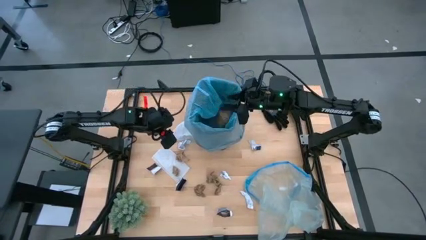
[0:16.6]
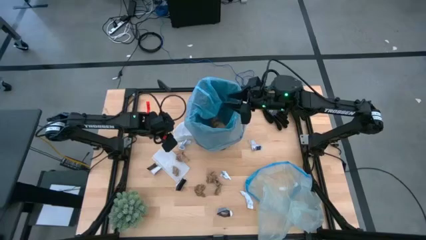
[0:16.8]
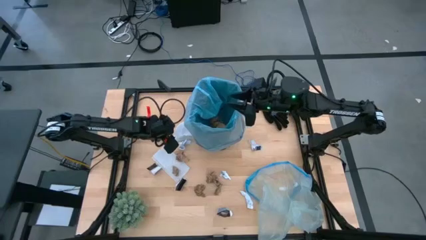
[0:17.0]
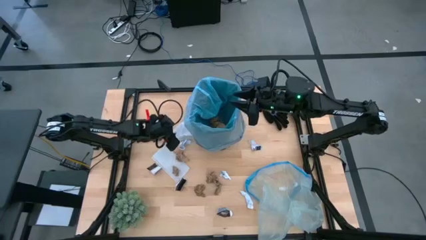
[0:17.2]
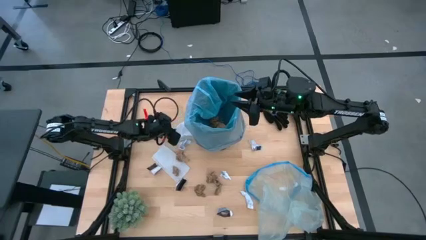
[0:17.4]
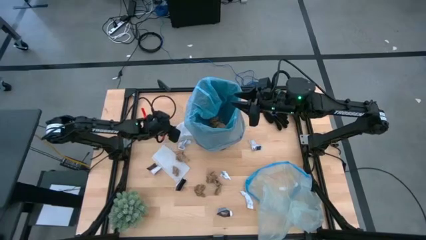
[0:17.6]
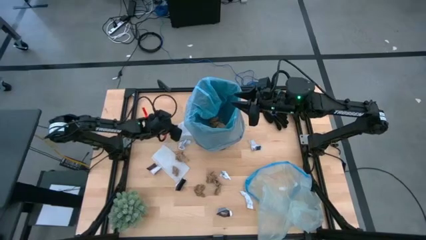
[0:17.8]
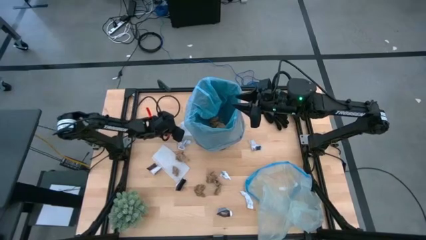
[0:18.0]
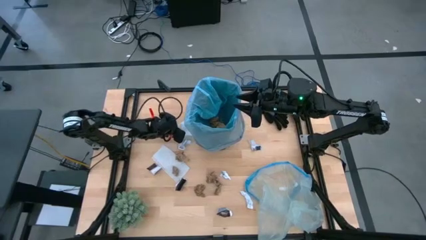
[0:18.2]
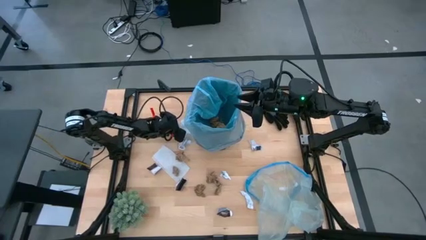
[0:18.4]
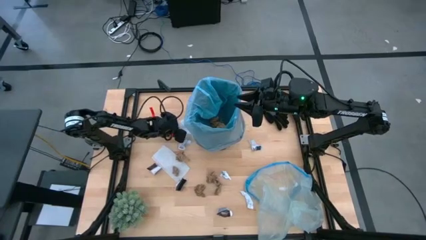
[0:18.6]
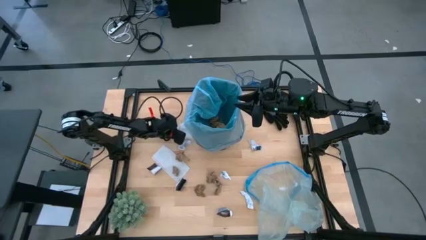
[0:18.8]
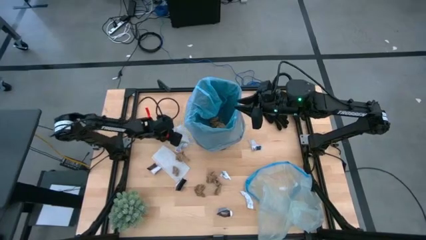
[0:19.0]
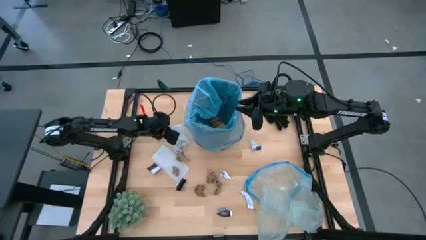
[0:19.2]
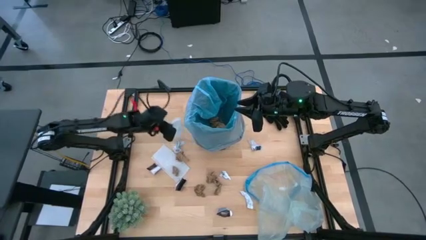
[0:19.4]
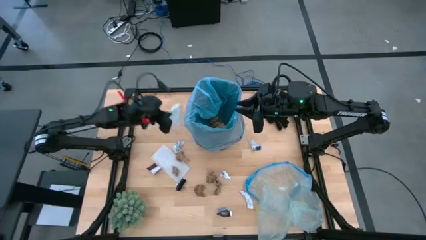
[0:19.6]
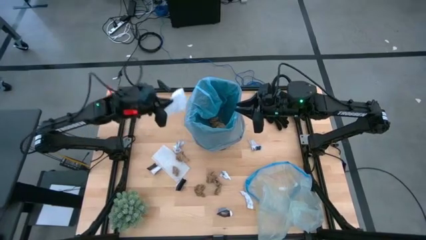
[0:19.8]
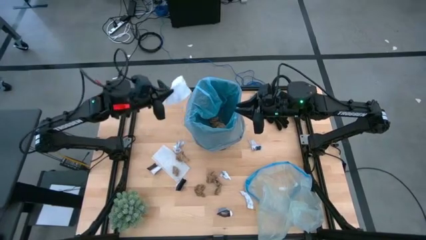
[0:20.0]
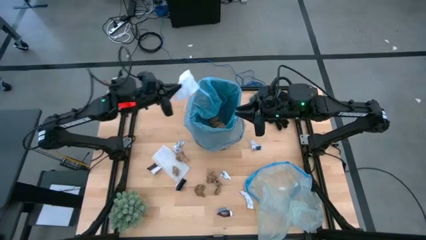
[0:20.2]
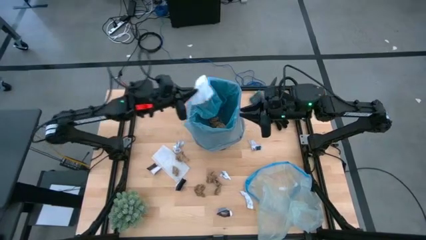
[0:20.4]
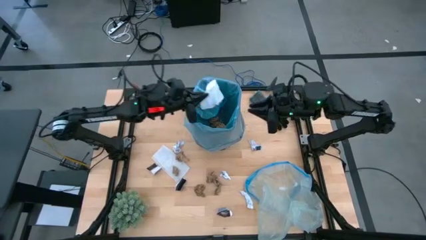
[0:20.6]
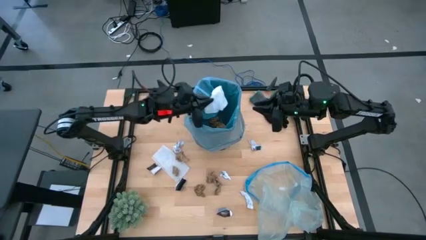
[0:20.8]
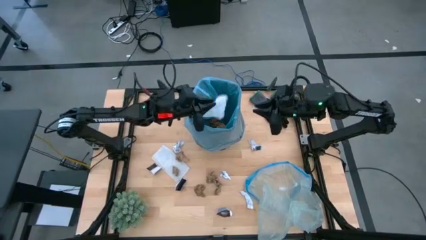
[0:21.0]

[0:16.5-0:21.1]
Task: place trash/remove bag and relplace
Put the white wipes into the trash bin

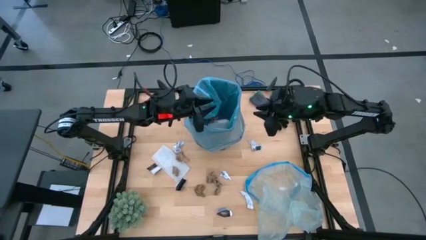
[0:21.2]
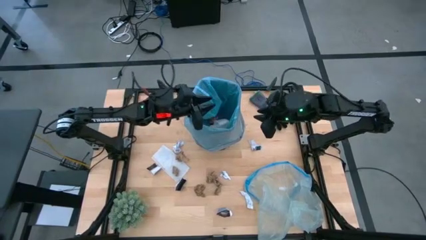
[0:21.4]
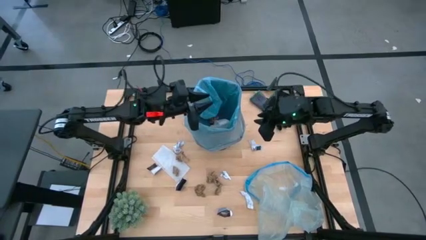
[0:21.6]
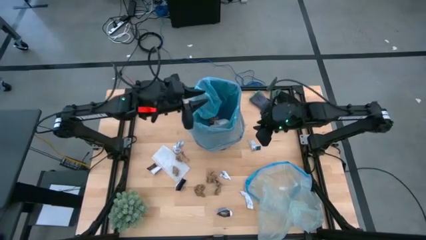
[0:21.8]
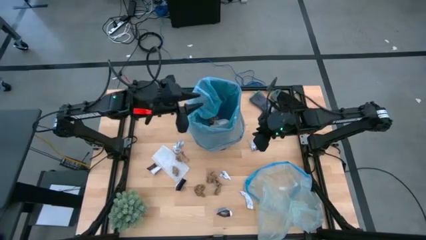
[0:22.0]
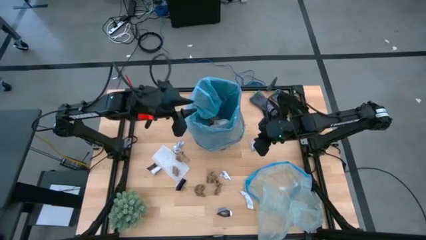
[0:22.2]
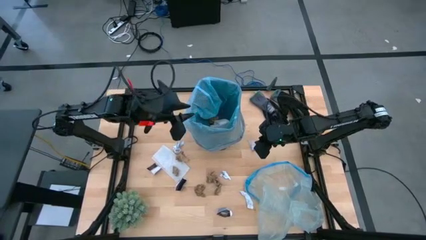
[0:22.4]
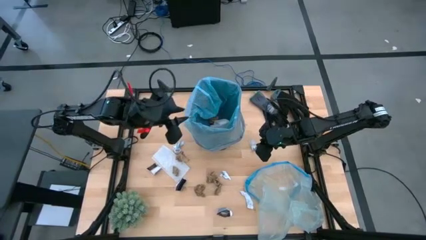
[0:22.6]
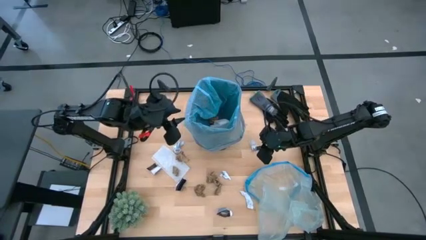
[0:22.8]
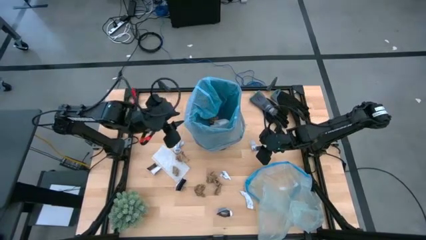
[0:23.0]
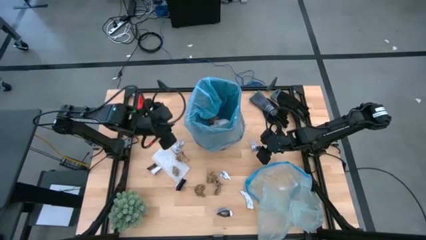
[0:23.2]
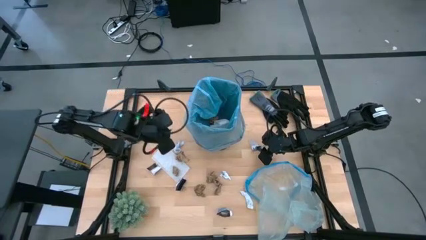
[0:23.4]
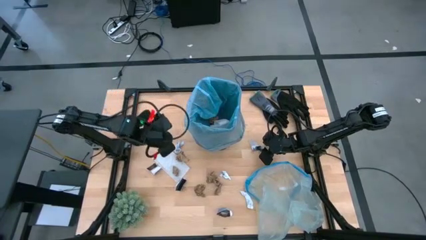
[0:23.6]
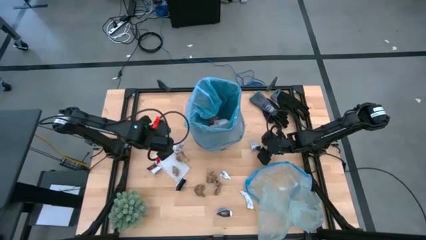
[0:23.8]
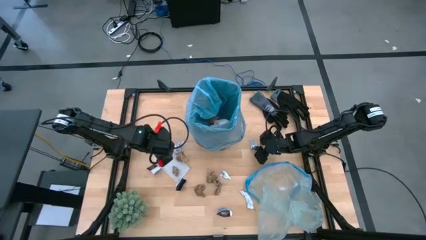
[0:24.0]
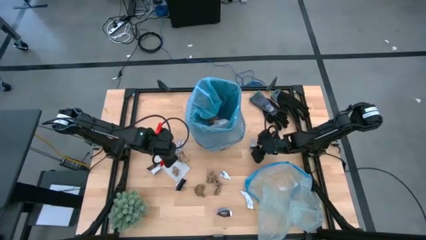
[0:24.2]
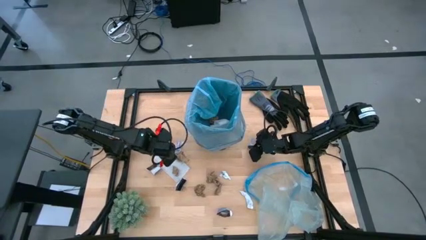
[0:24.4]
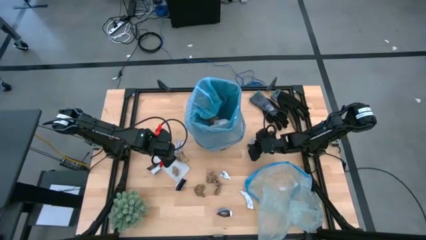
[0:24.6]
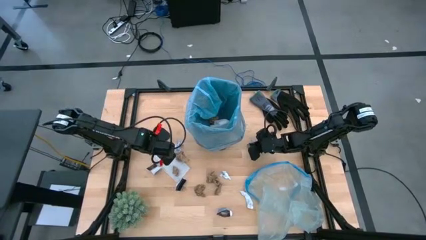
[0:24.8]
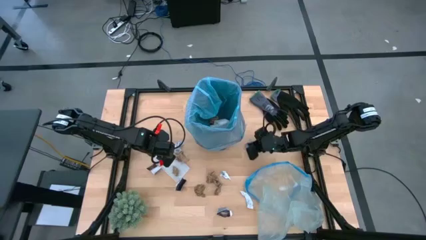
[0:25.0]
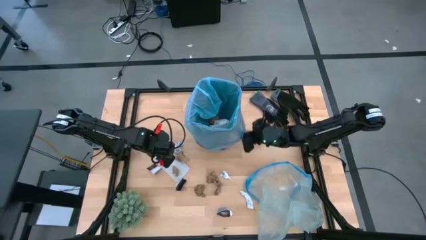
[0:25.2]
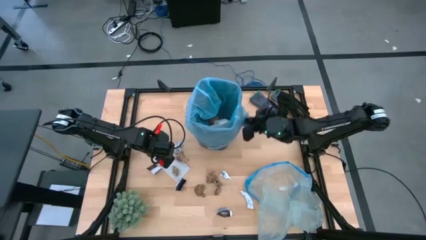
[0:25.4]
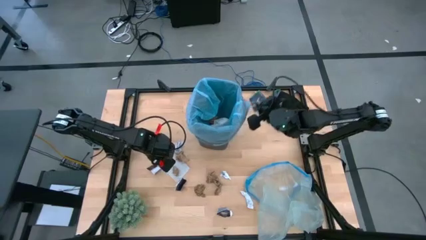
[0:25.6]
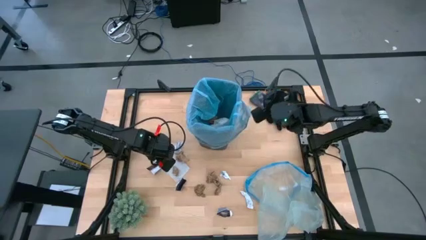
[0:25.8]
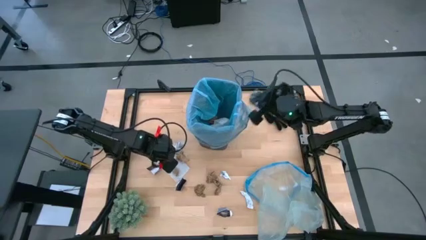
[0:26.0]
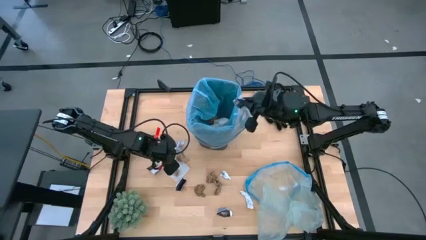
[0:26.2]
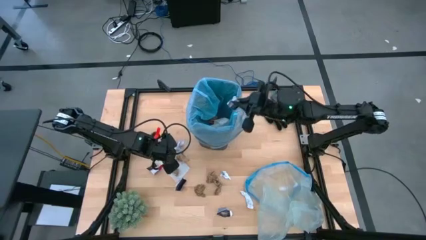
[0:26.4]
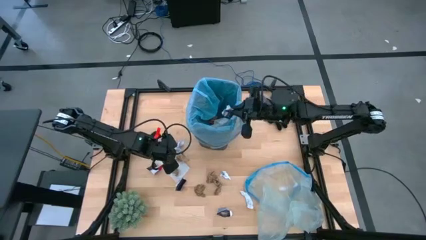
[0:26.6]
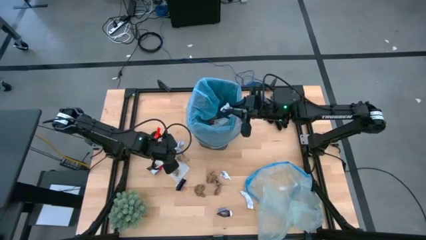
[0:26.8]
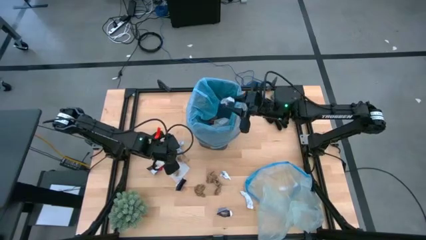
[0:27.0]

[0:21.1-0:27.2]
Put the white paper into the trash bin

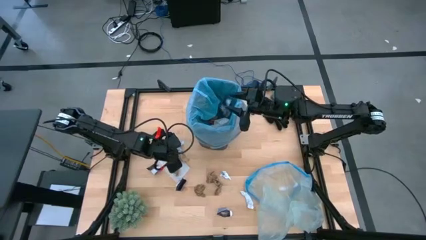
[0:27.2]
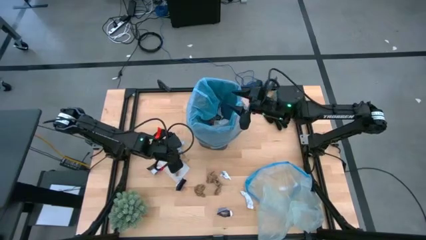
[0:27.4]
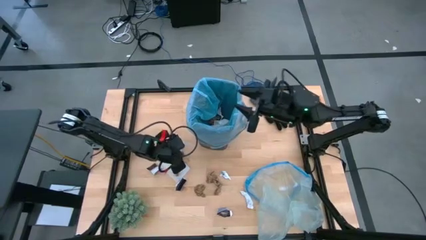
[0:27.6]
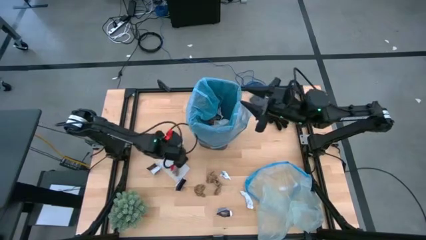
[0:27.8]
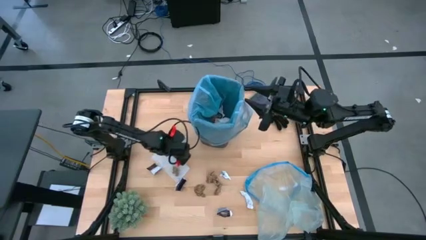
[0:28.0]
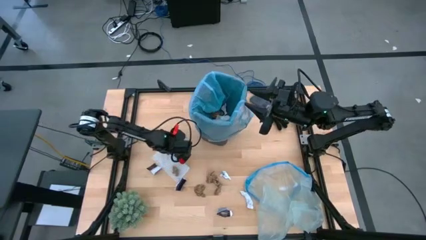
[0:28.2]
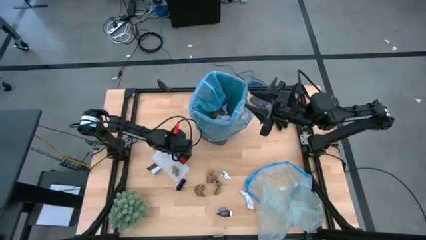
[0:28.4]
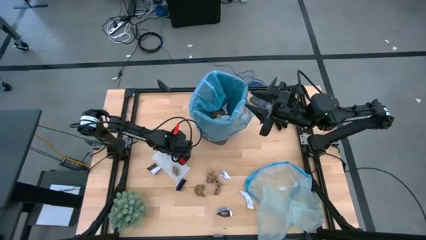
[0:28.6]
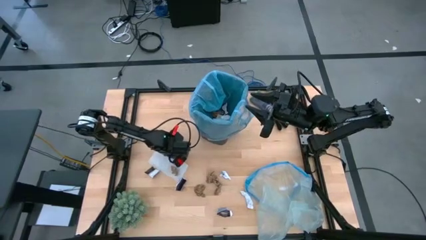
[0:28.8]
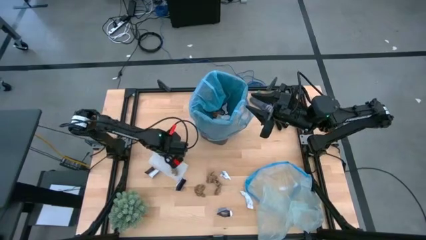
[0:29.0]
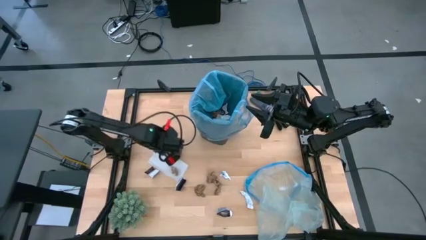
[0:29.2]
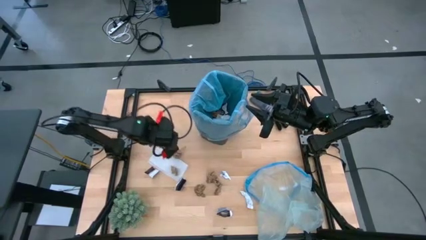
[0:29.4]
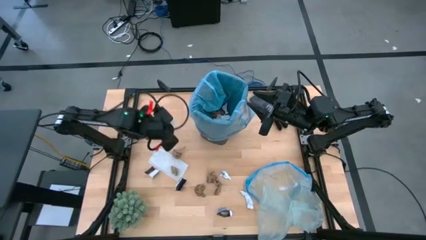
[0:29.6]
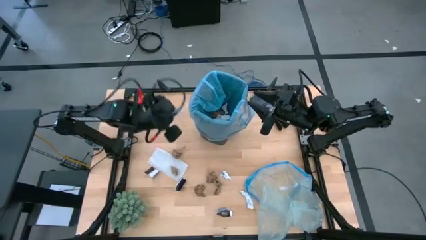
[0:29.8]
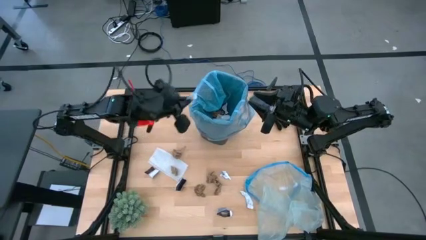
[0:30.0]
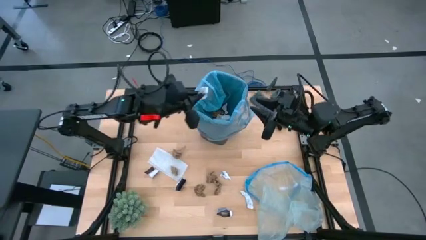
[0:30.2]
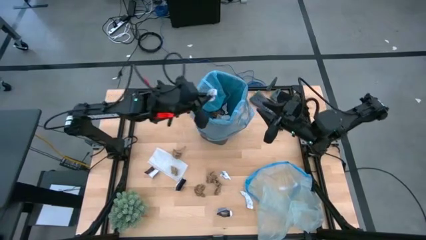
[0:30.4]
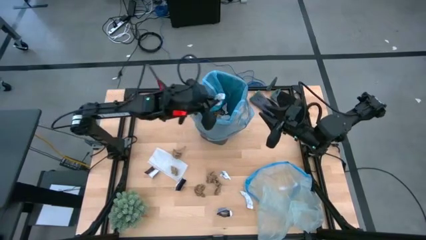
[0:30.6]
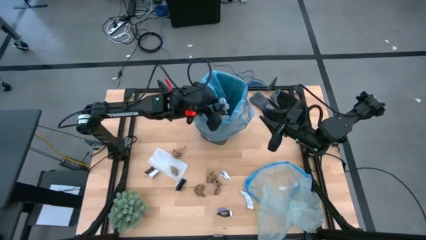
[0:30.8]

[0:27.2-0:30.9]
Put the white paper into the trash bin

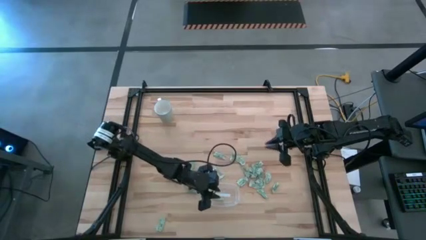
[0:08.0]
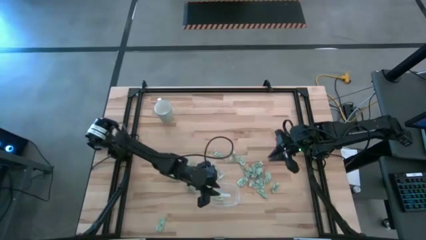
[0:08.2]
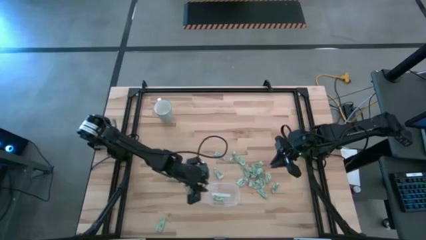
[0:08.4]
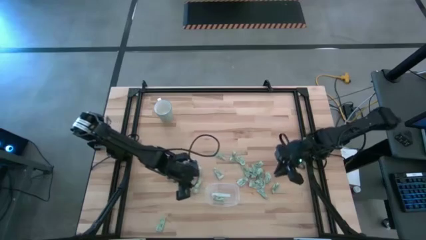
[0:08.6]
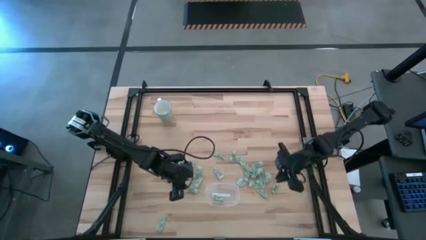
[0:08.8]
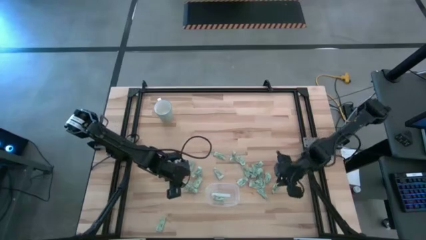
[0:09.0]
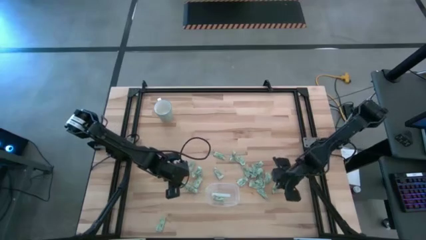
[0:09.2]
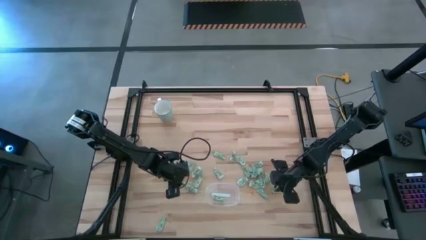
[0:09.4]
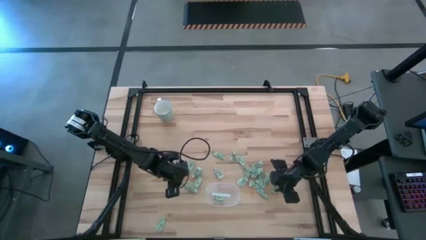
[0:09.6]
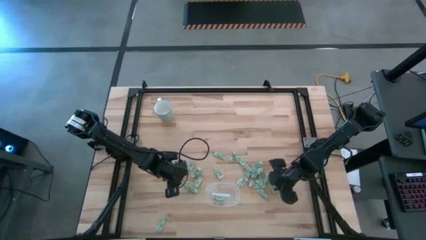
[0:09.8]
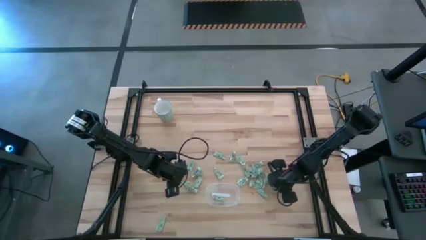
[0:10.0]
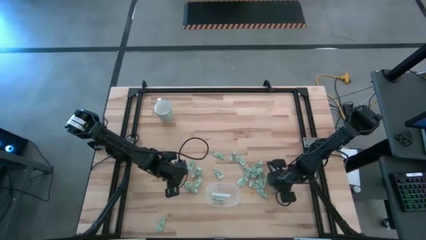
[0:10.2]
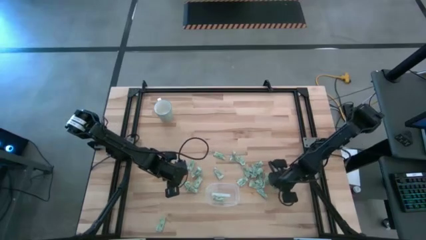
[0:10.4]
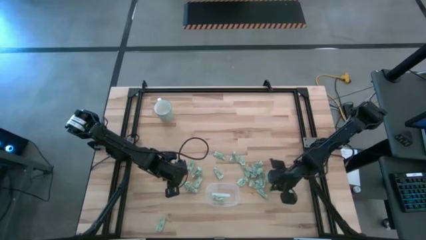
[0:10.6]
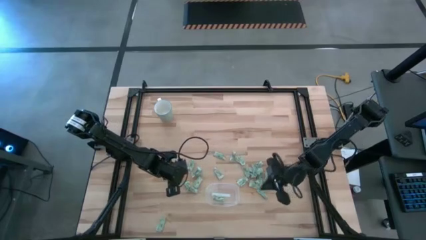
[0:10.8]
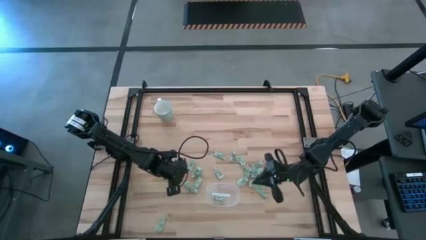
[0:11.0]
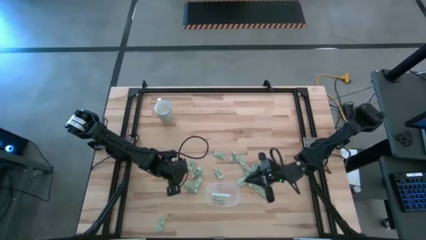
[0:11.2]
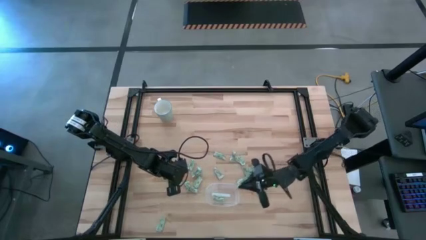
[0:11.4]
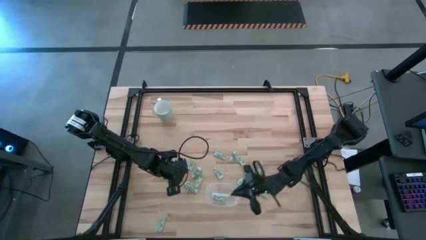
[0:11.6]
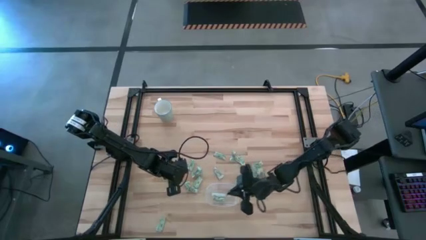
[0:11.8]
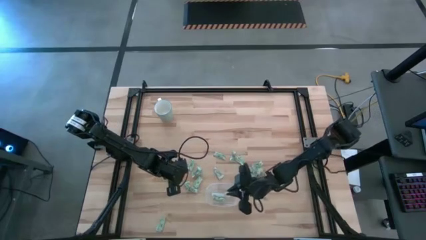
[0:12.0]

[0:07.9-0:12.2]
Task: Pick and place Stevia / Truvia into bins
Put the stevia packet into the transparent container
